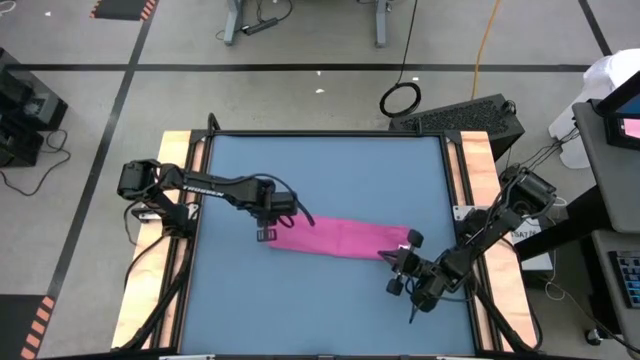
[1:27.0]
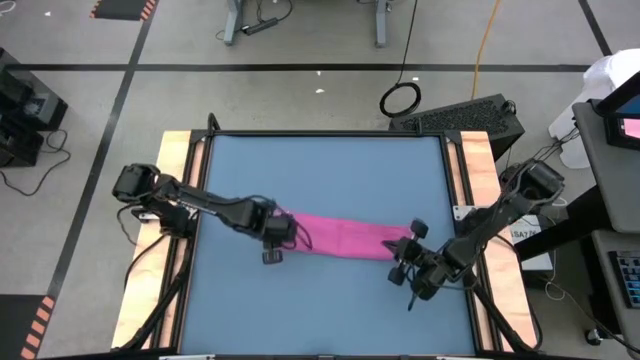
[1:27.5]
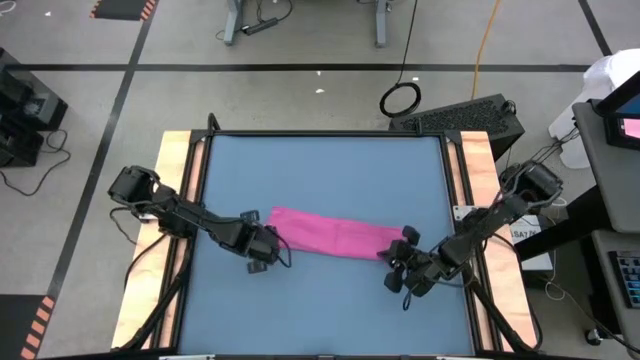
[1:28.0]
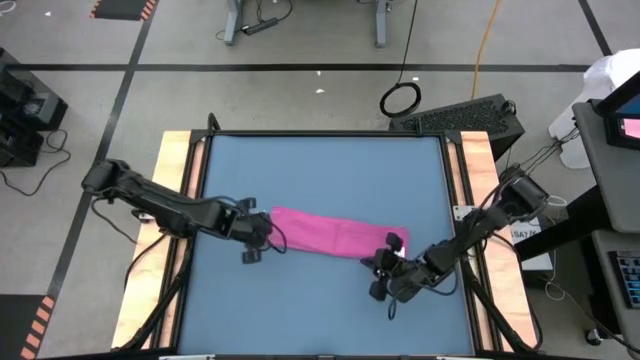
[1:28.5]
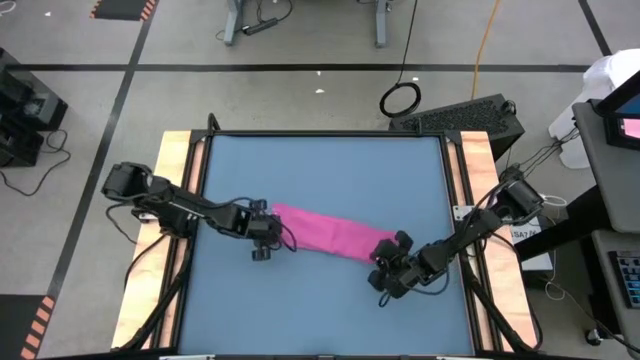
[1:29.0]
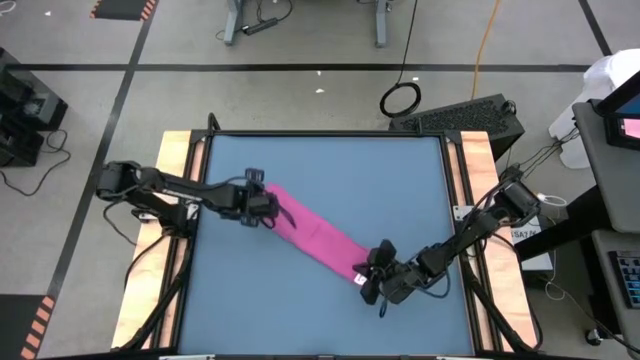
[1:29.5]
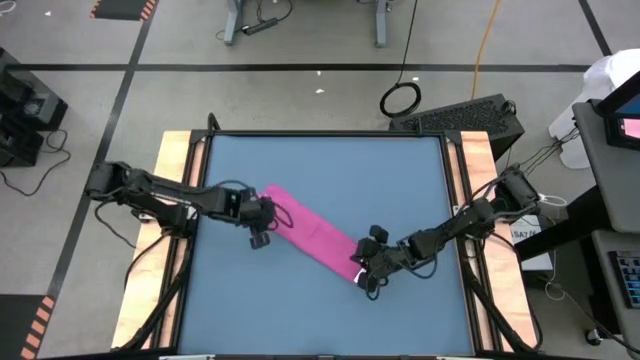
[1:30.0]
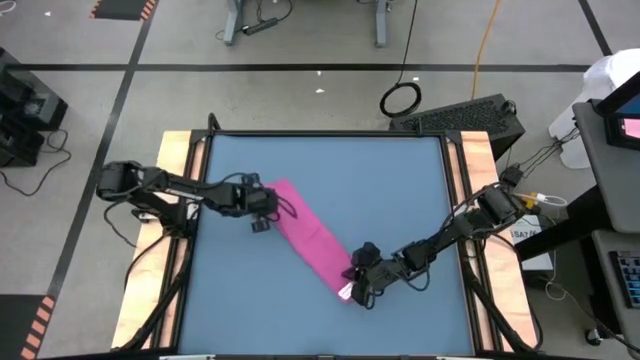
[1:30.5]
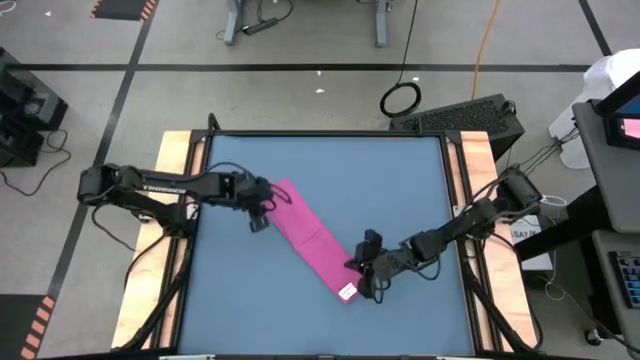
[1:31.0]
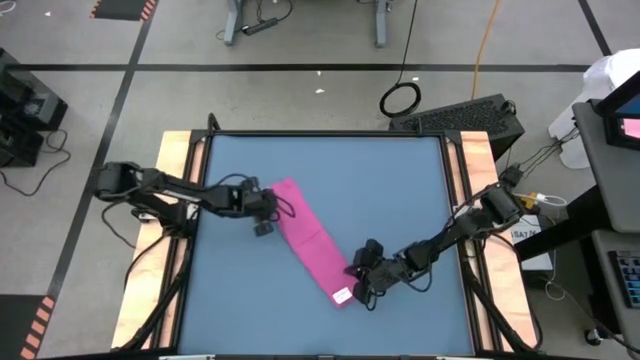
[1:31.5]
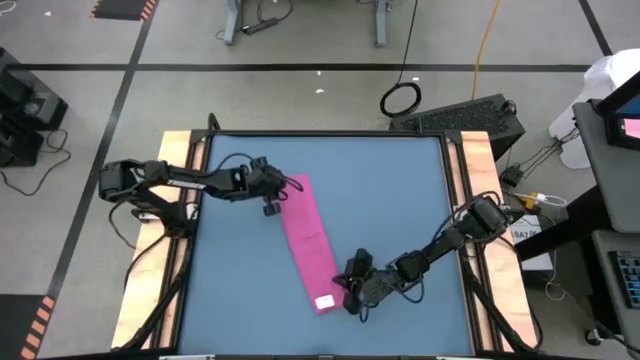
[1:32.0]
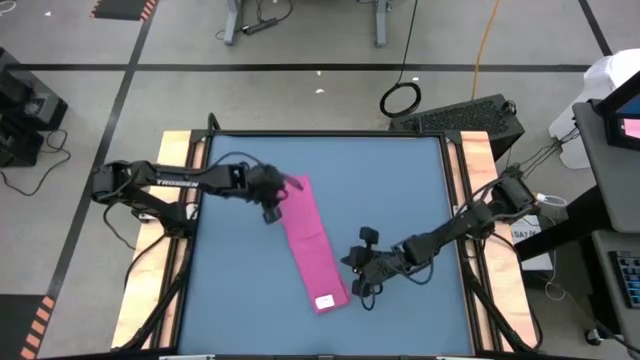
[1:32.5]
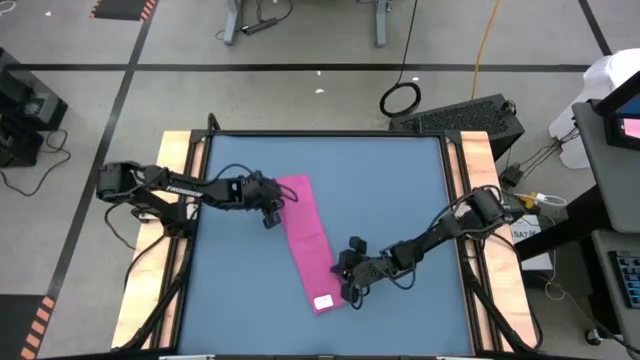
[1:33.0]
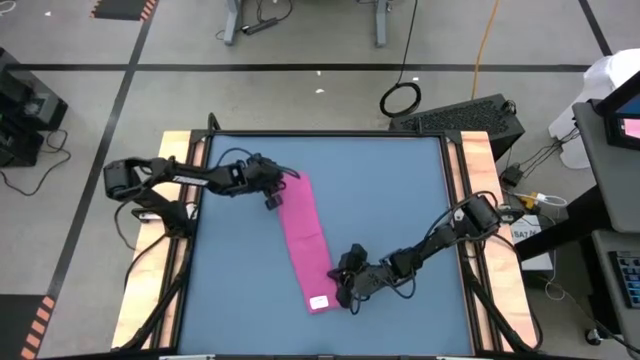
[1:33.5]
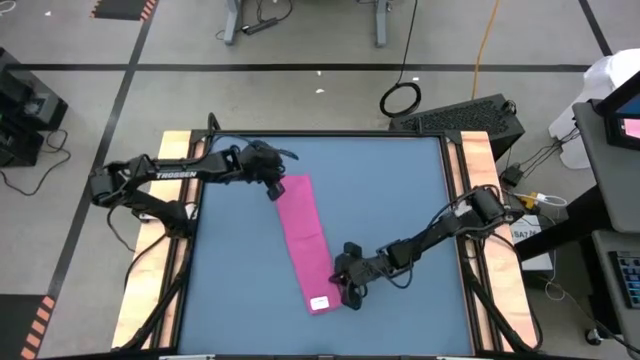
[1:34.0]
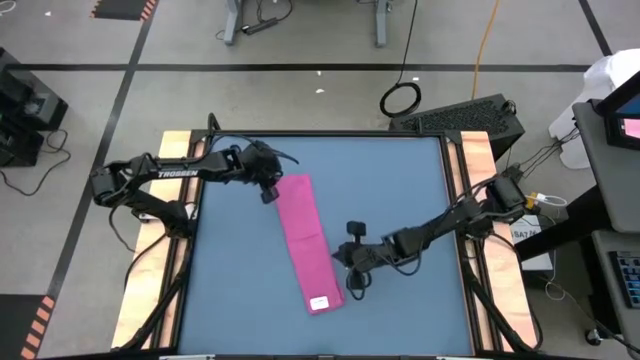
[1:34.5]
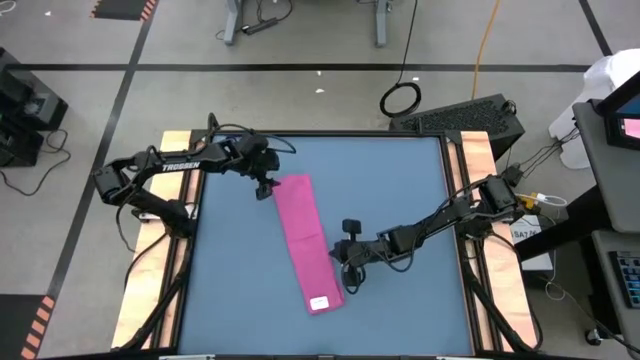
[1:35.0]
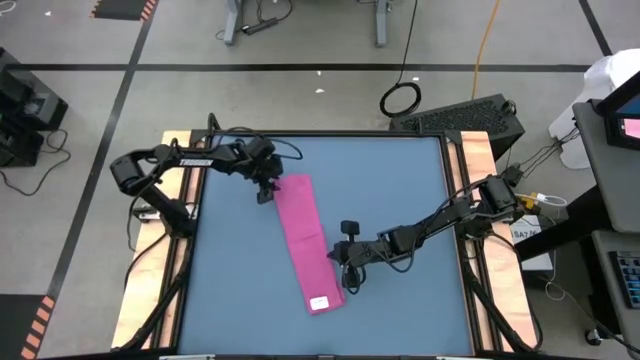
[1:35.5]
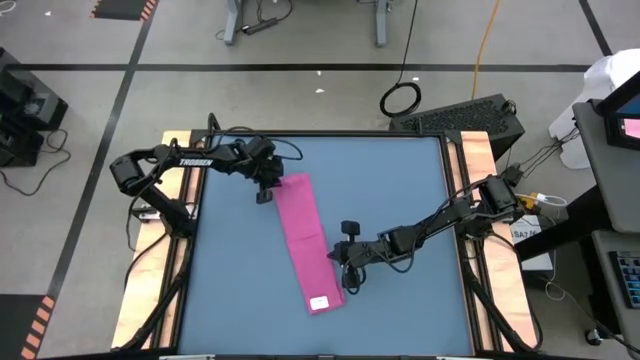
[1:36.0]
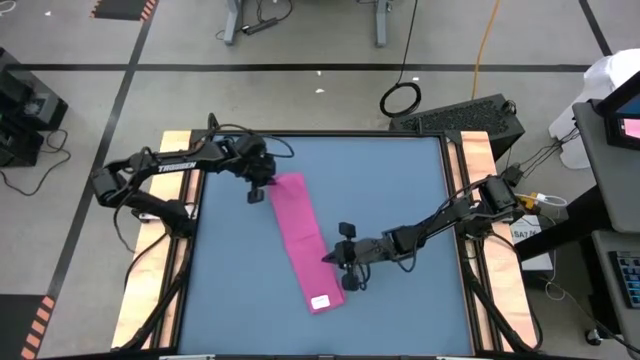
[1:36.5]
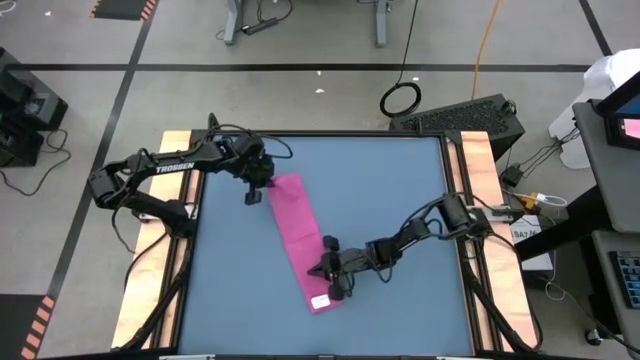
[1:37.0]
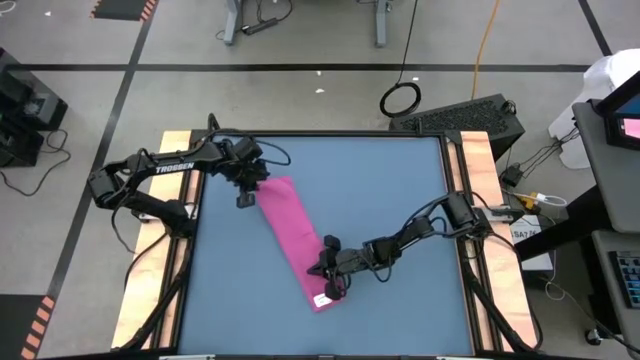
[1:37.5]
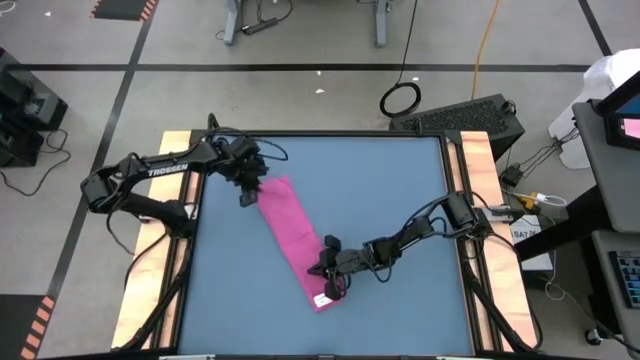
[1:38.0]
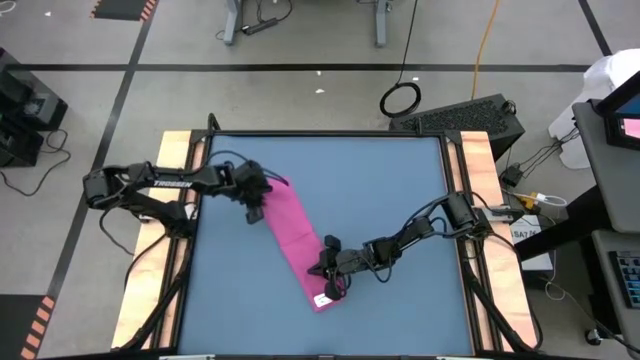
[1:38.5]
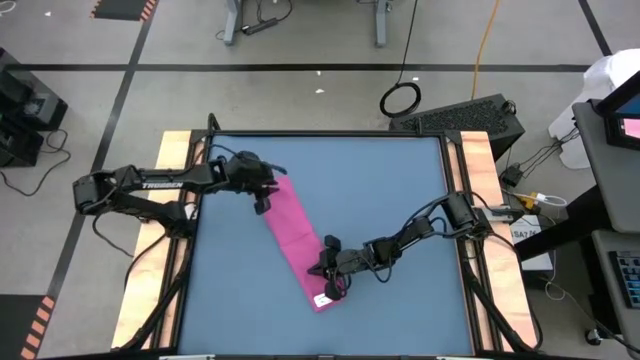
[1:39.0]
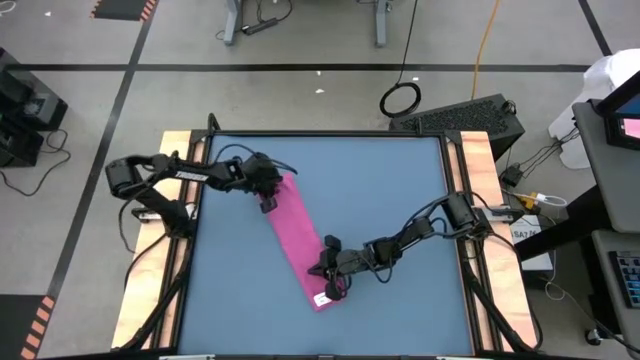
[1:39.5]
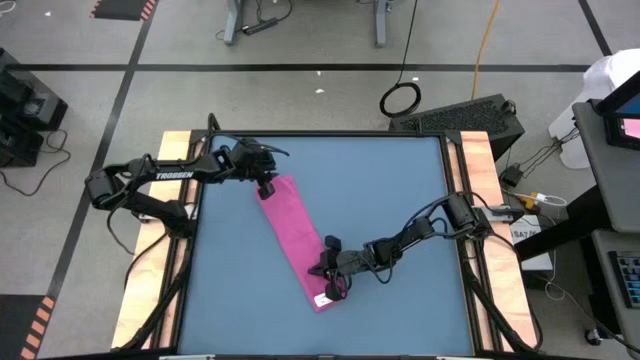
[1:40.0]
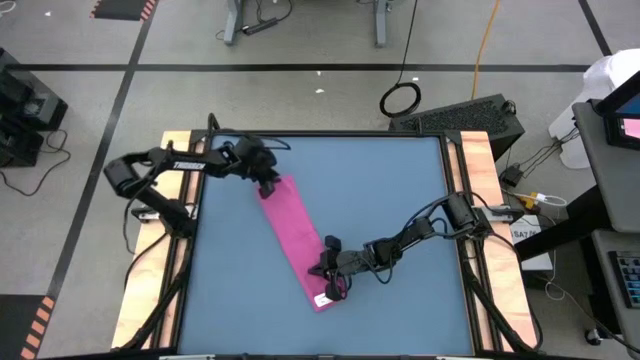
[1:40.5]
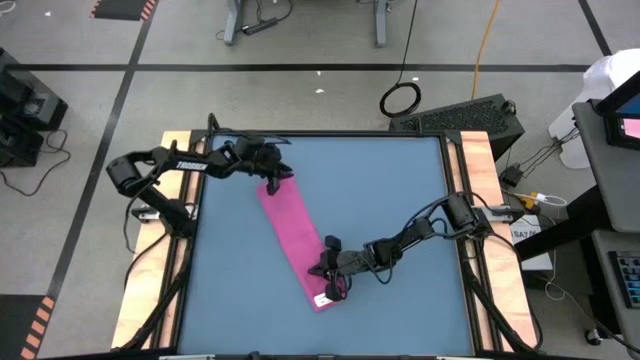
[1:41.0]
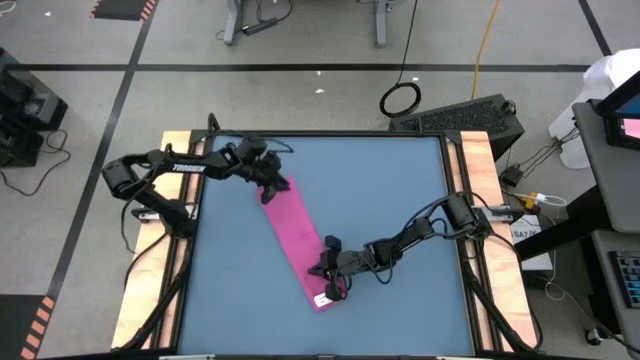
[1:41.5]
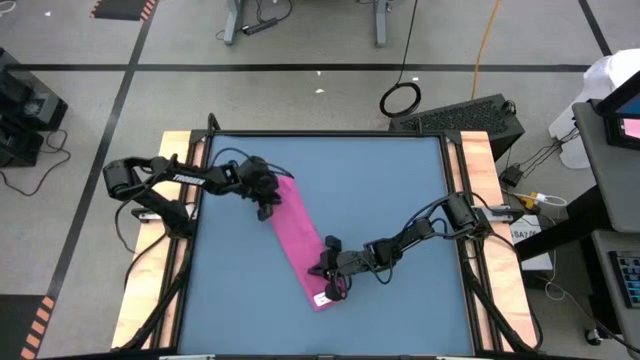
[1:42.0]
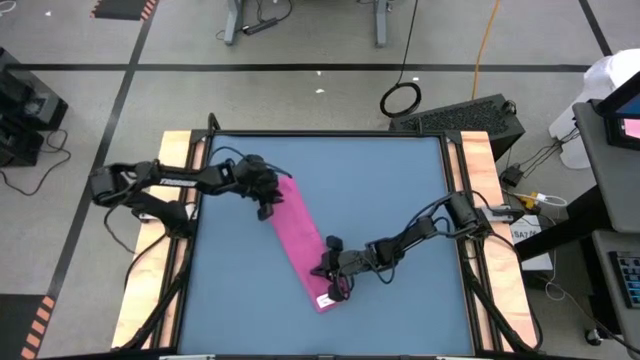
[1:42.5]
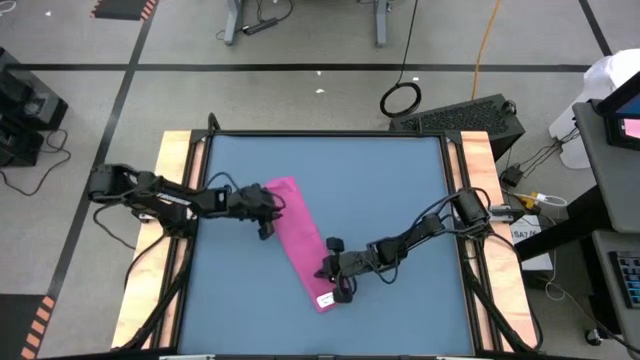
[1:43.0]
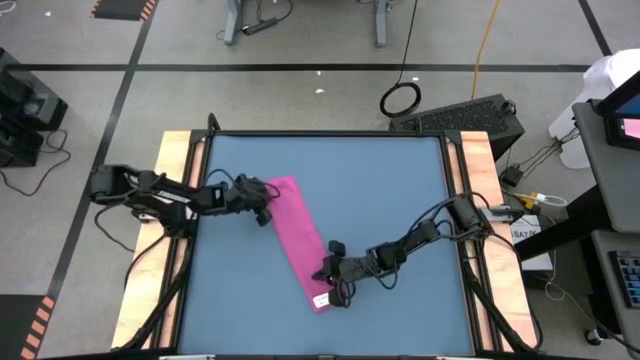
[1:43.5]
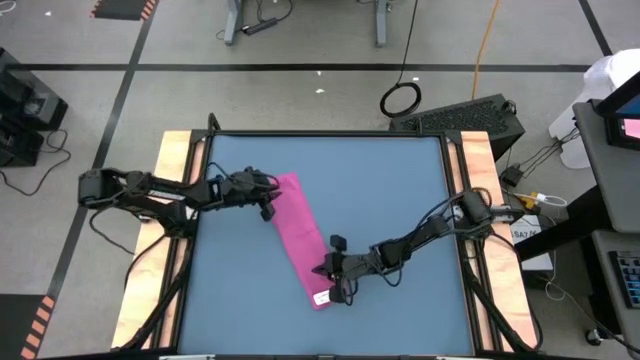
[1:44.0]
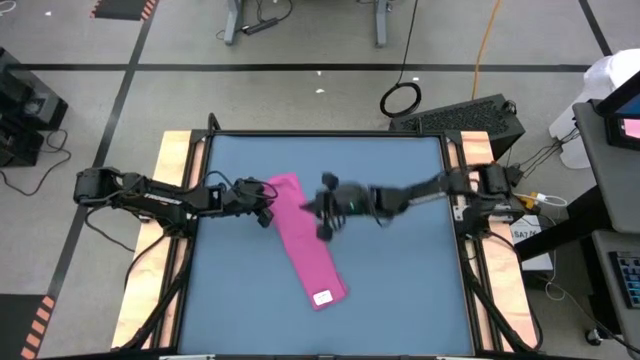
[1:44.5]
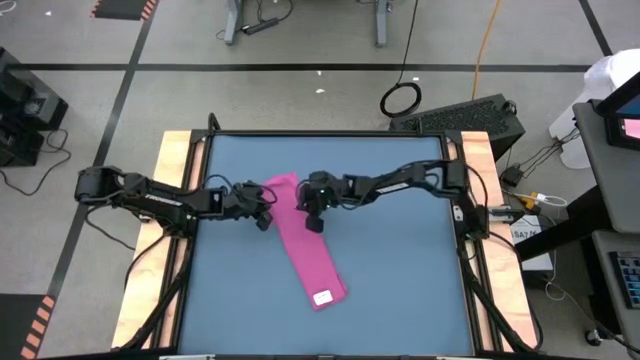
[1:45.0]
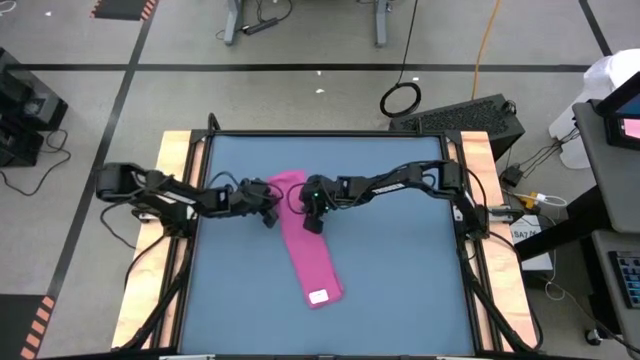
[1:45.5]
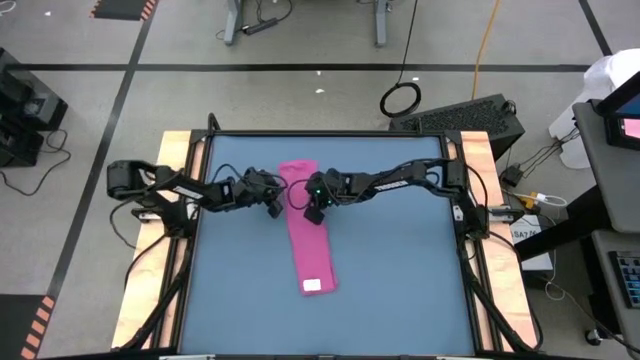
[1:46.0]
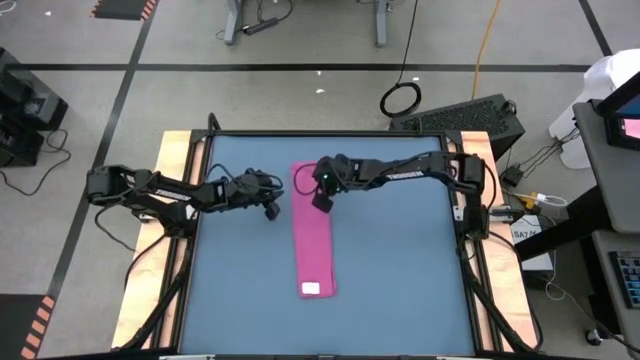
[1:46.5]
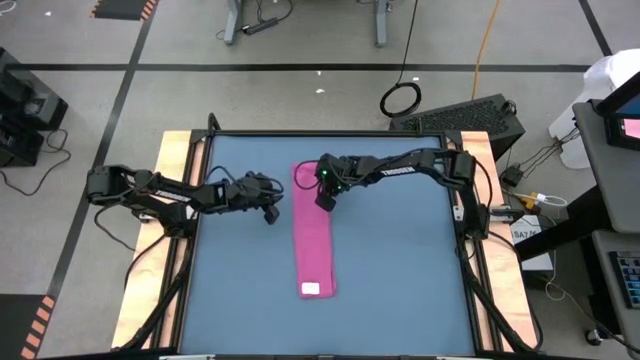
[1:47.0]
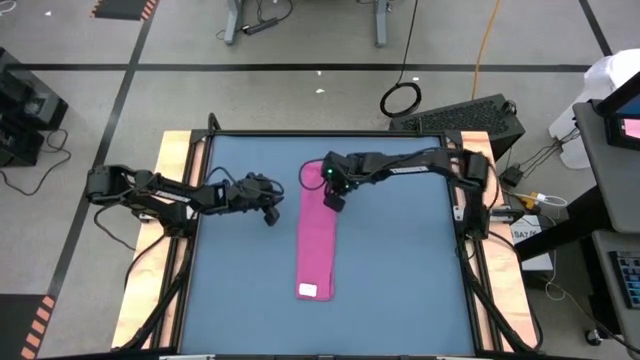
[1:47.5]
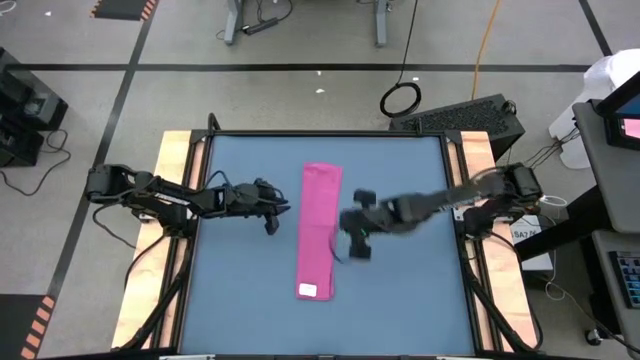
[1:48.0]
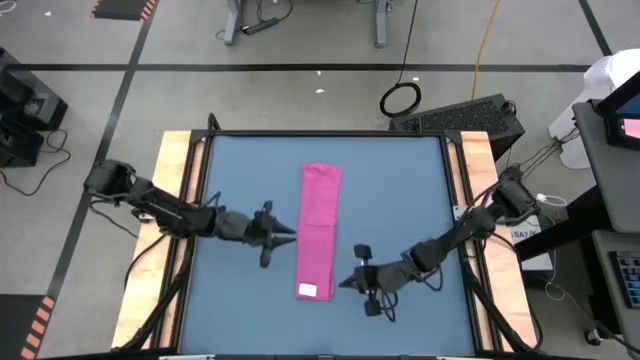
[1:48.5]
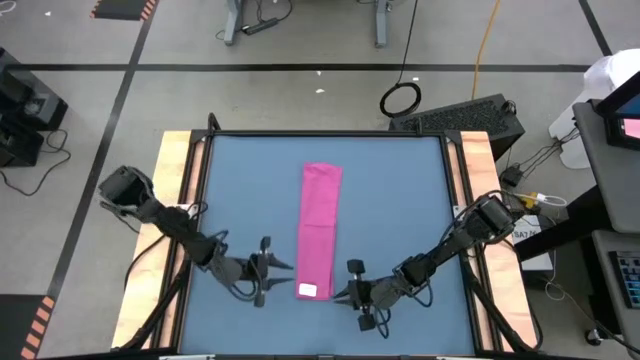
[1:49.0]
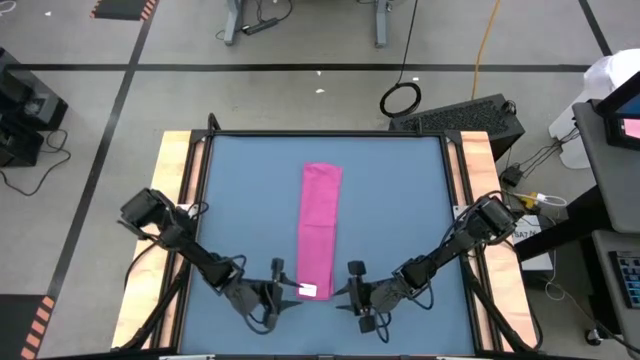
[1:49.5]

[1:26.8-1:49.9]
Task: Roll towel into tight, uniform cylinder
Roll the pink towel
